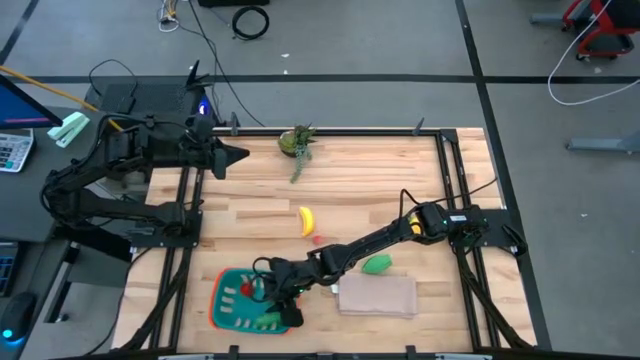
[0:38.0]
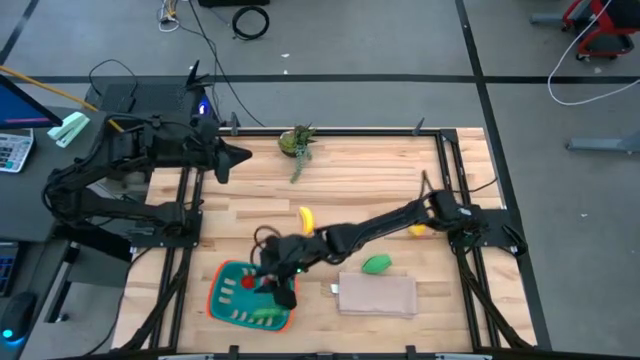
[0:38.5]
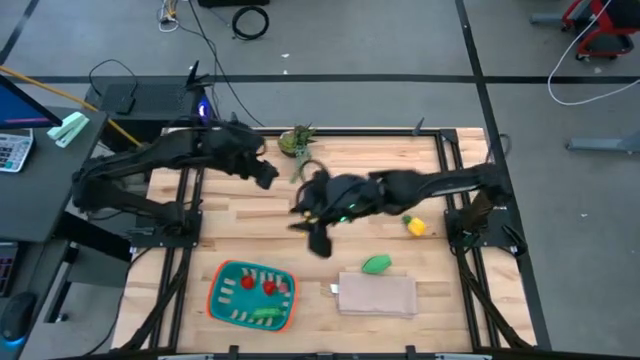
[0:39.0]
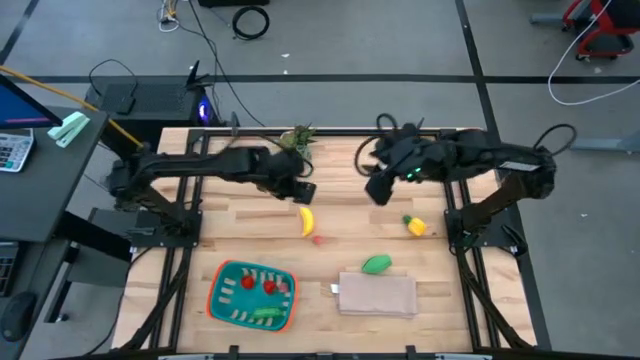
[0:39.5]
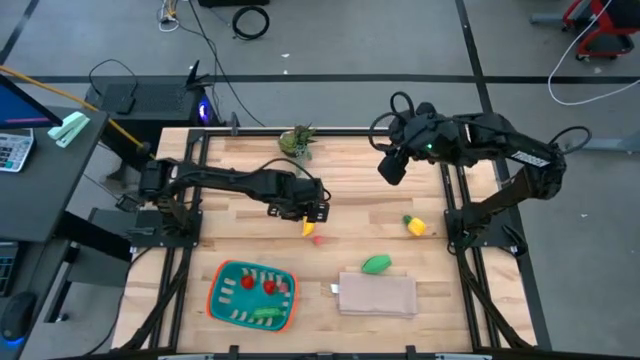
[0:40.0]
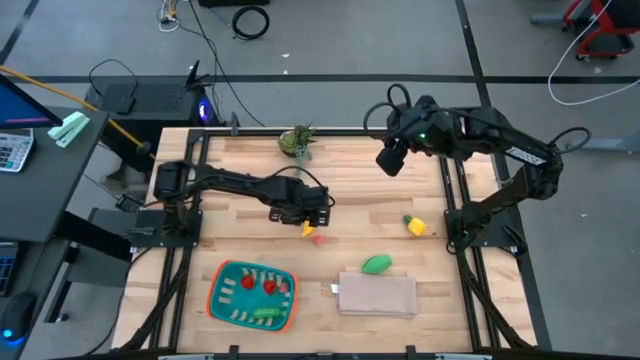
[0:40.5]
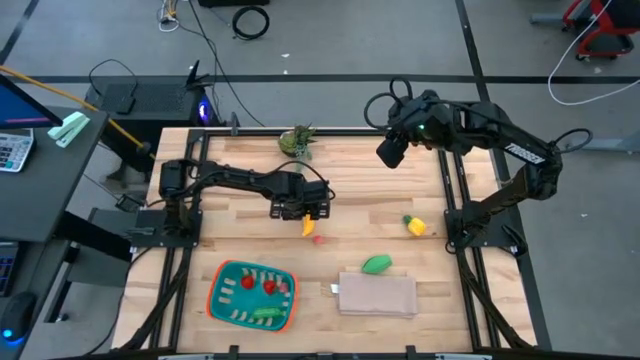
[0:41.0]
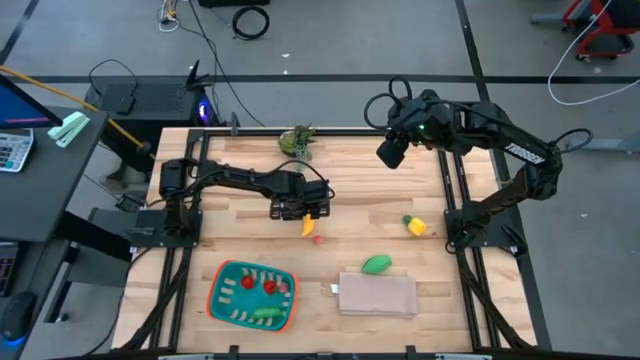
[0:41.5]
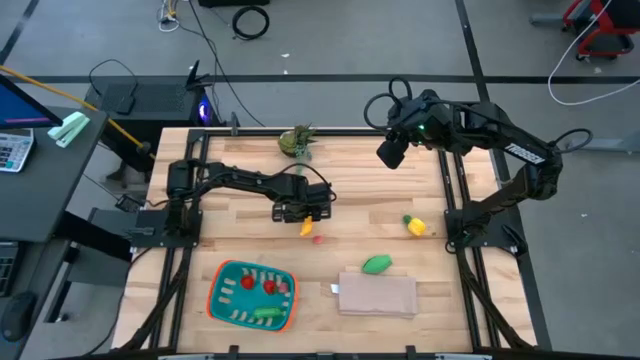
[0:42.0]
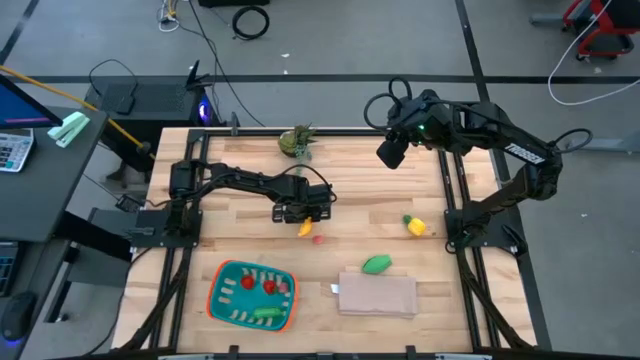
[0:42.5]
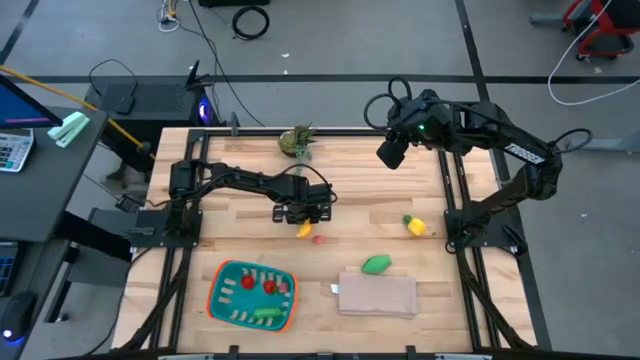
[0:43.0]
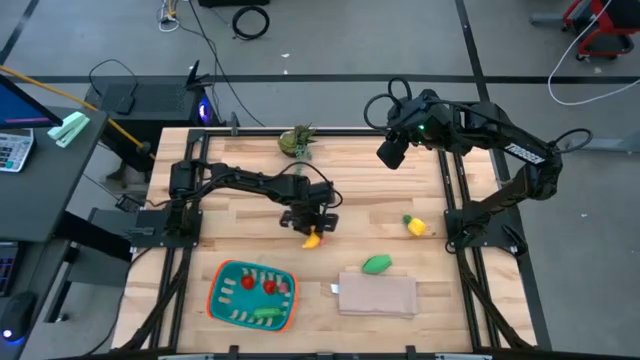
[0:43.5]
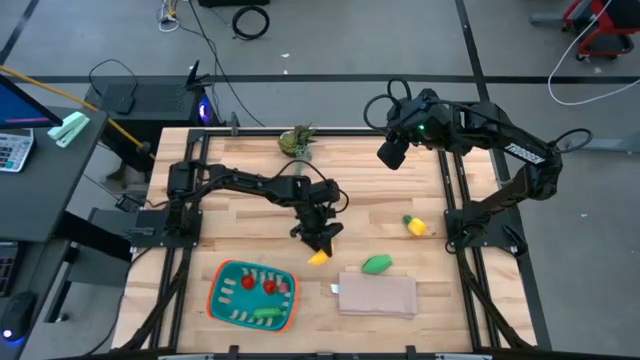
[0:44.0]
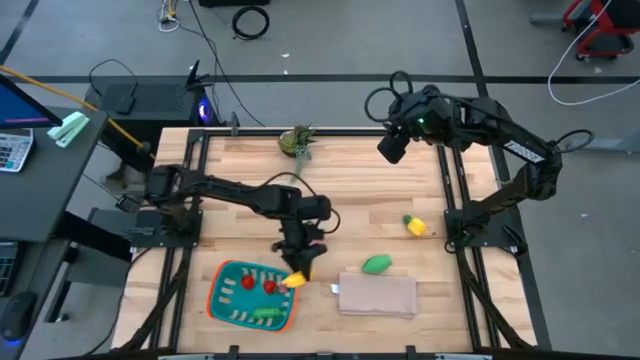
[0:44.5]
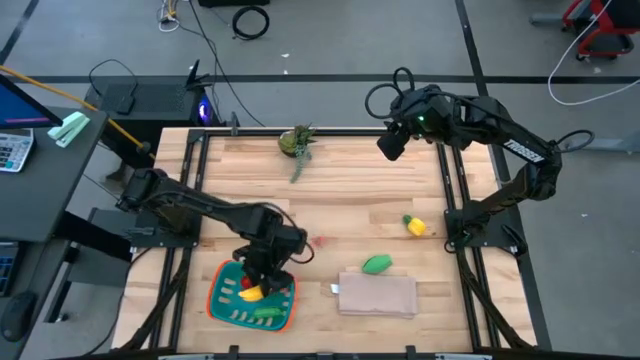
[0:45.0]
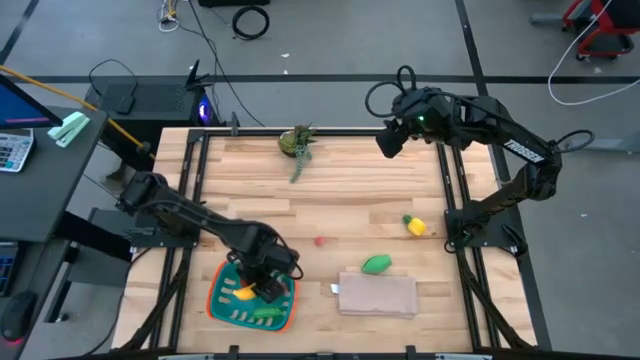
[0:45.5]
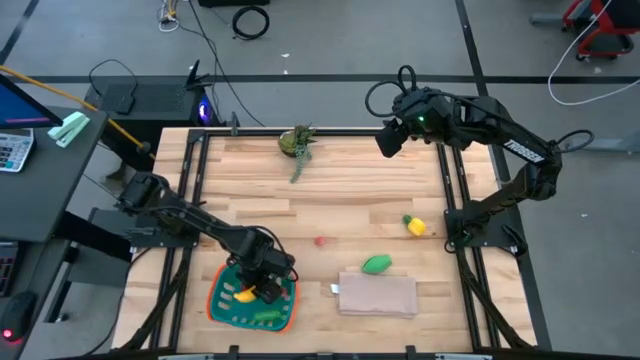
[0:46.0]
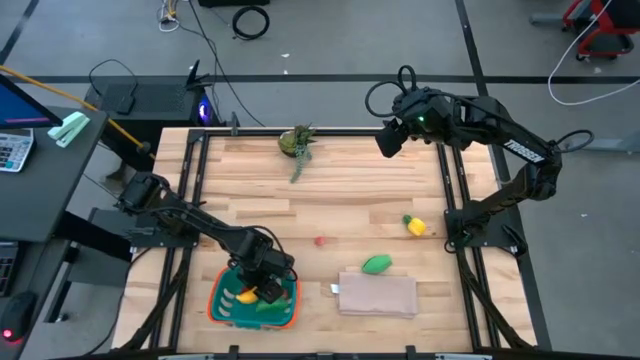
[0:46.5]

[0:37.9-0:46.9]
Task: Pick and placing Produce into tupperware
Put the yellow banana into the blue basket

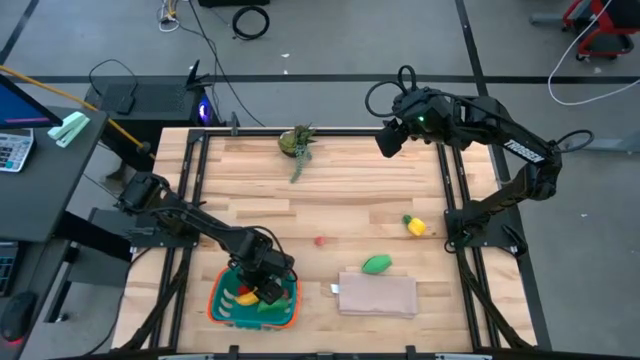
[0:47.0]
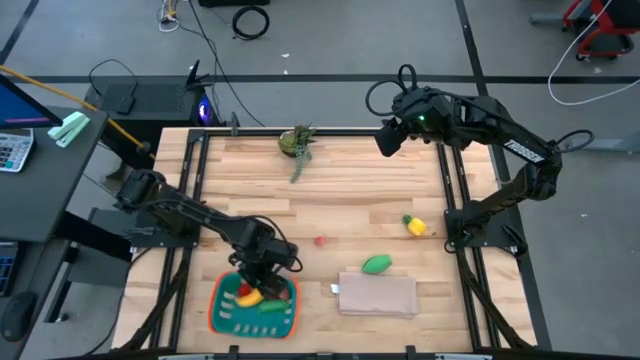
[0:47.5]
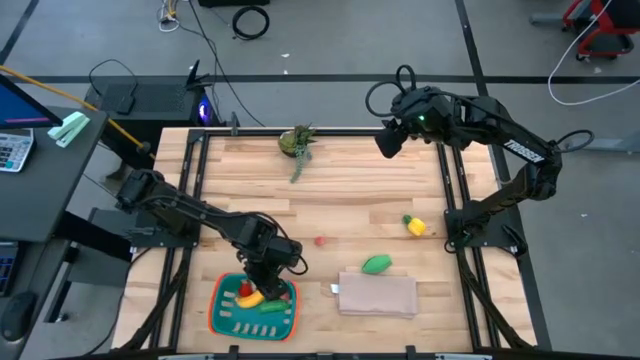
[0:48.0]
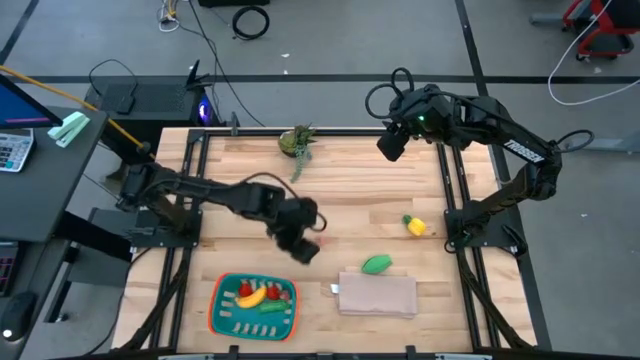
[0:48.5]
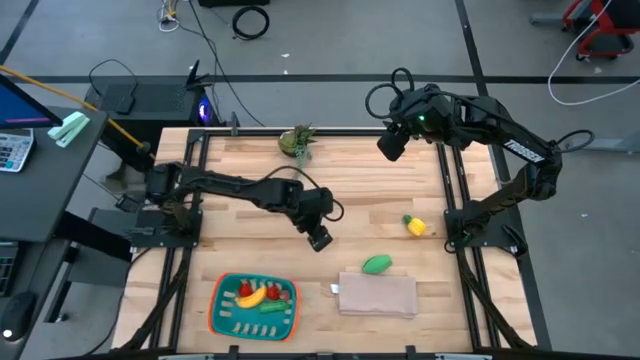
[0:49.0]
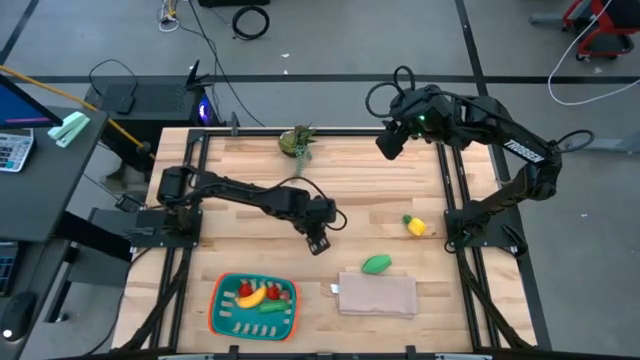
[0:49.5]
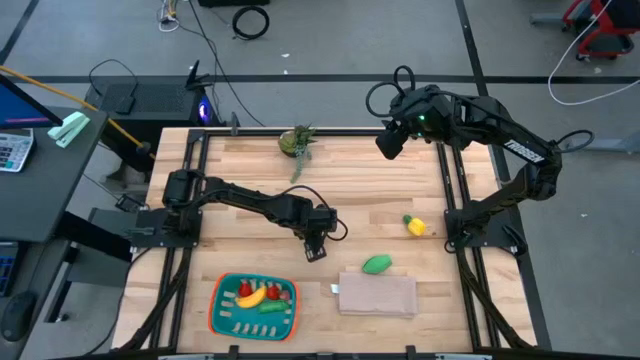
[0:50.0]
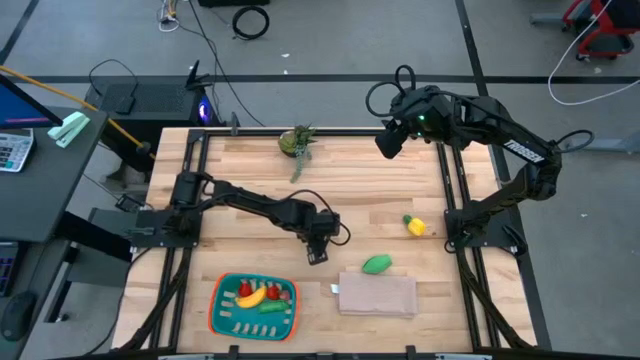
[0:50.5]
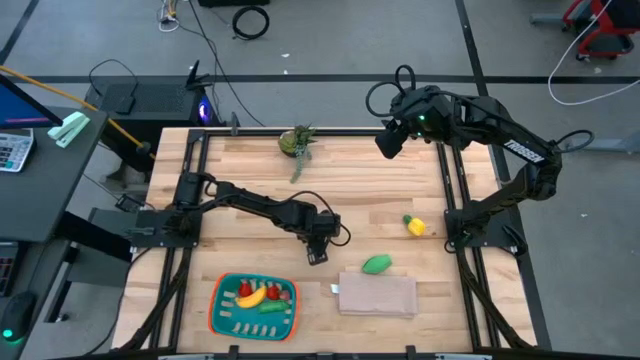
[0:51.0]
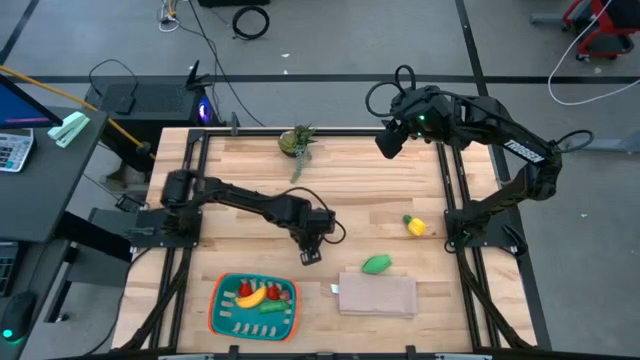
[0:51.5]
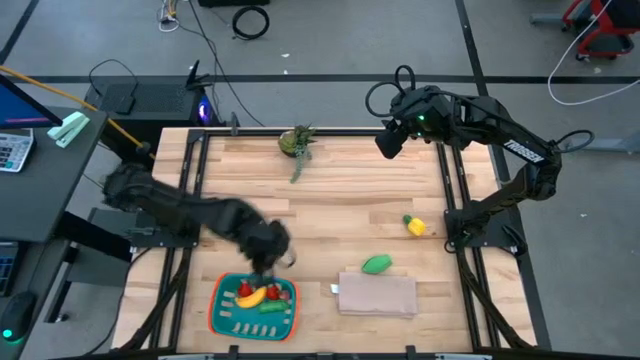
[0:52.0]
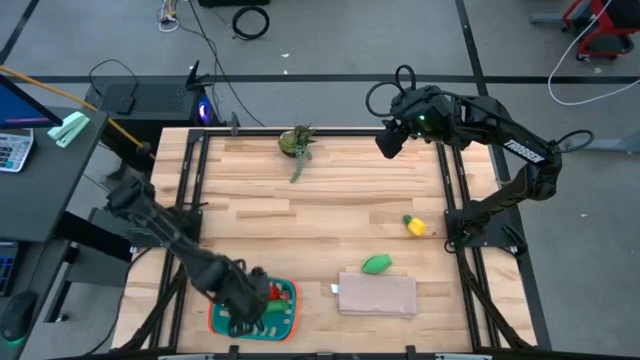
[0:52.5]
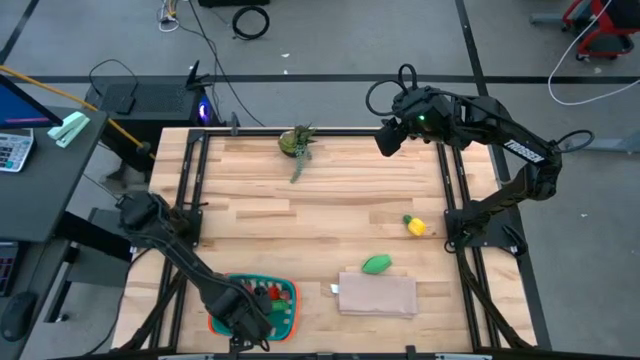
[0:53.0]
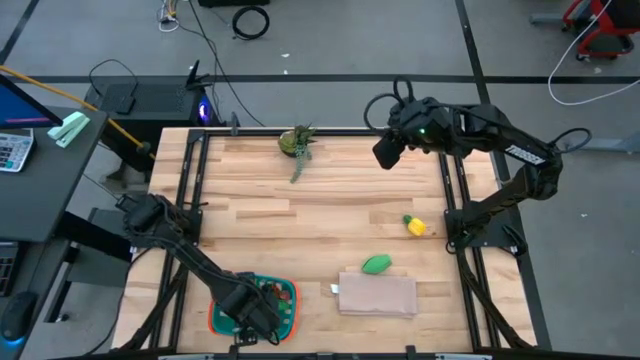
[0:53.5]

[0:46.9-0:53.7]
Put the pink apricot into the blue basket

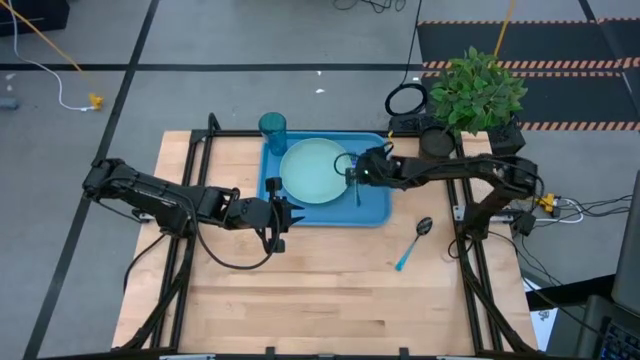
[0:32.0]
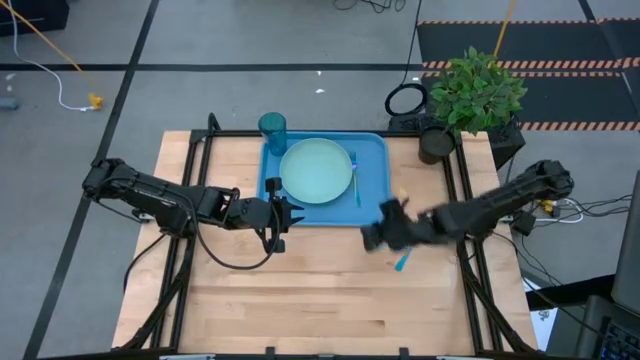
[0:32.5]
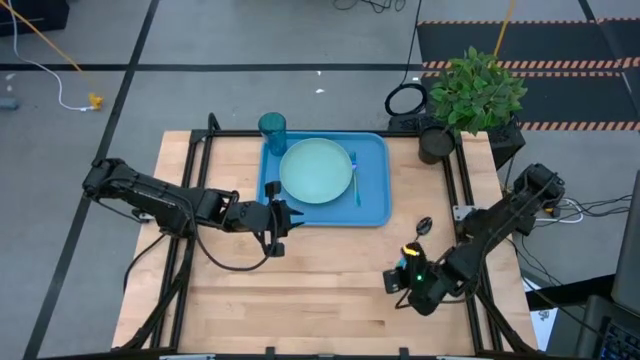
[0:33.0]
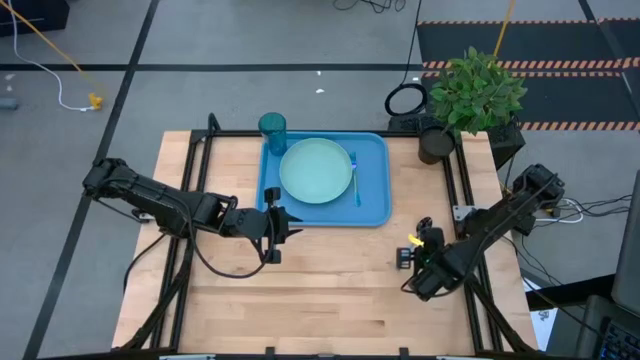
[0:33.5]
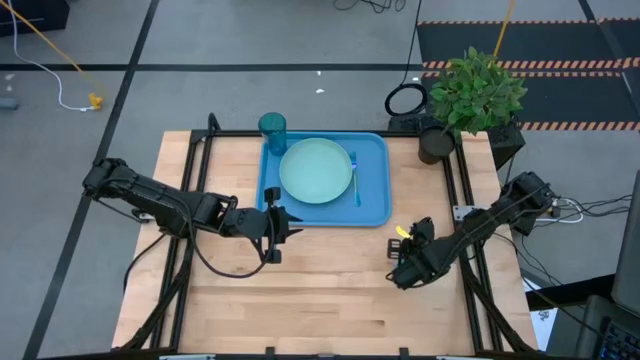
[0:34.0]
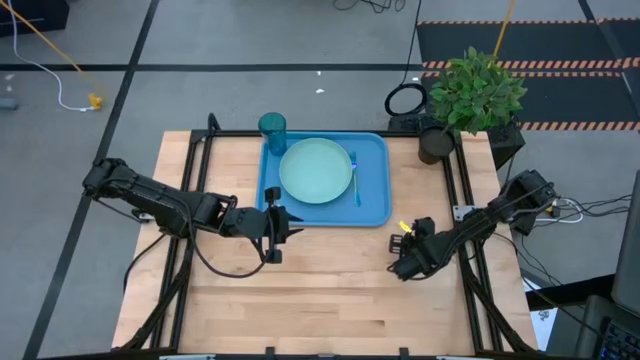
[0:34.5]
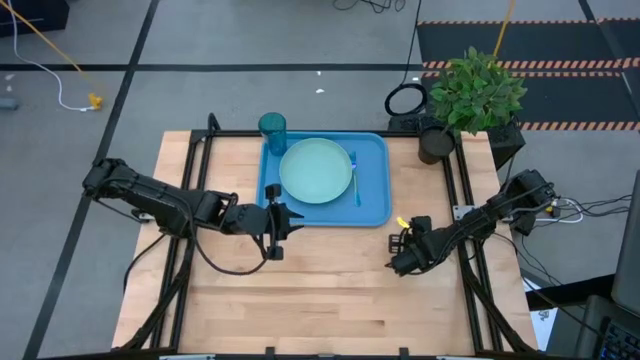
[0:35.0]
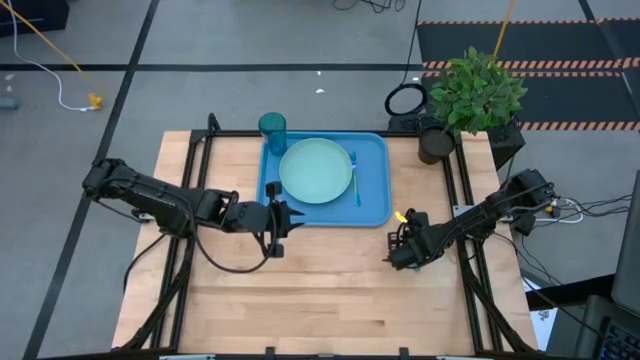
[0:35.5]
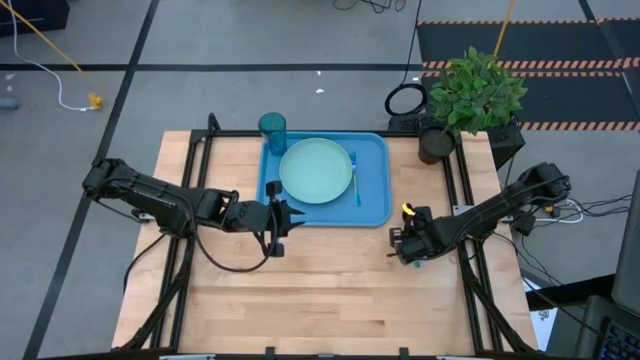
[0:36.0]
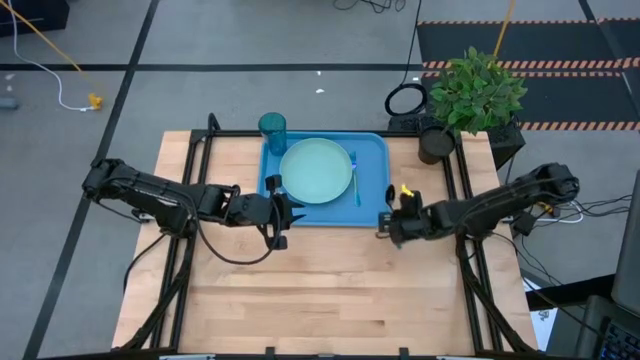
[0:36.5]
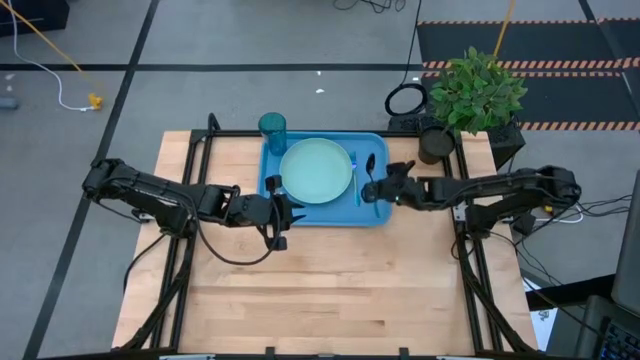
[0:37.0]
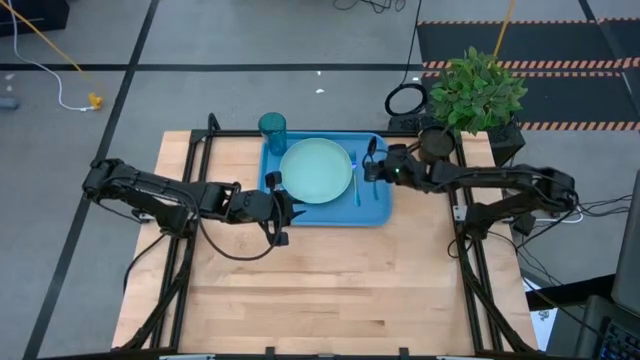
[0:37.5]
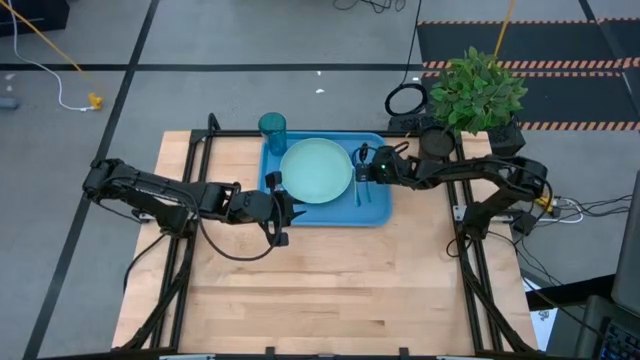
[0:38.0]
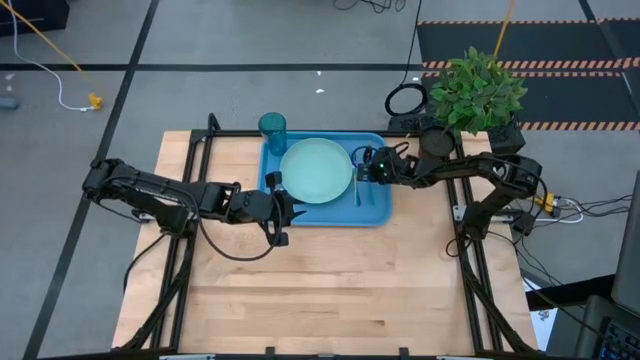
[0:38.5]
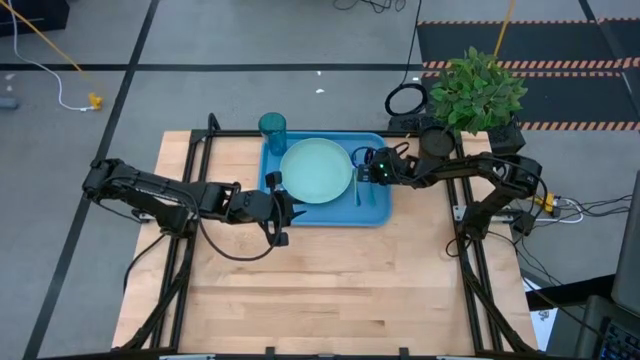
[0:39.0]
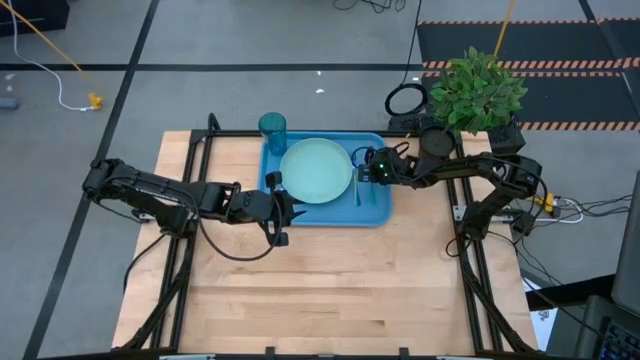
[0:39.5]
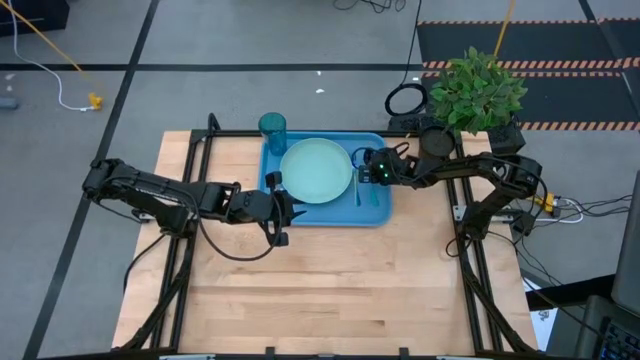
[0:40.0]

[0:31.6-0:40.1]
Task: Pick and place plate/cup/fork/spoon on tray
Put the spoon on the right beside the fork on the blue tray
